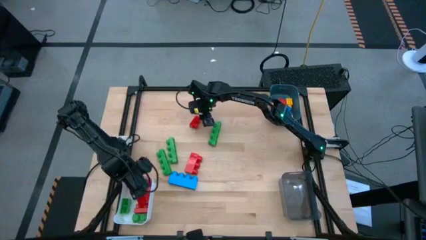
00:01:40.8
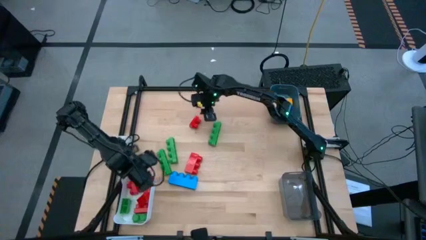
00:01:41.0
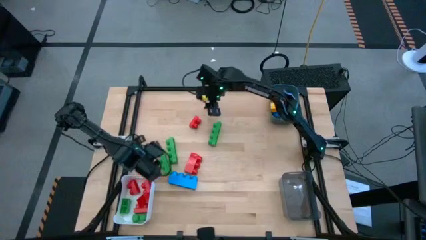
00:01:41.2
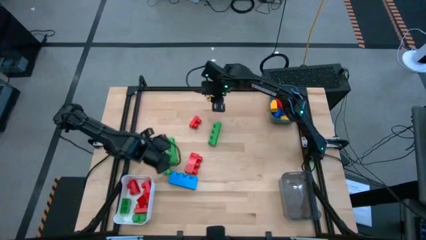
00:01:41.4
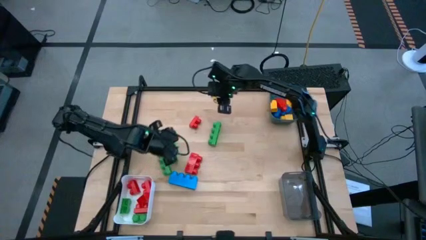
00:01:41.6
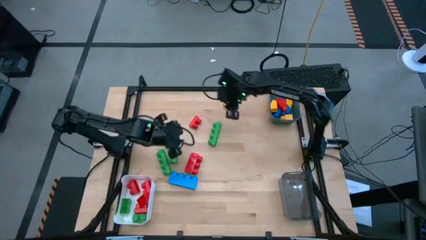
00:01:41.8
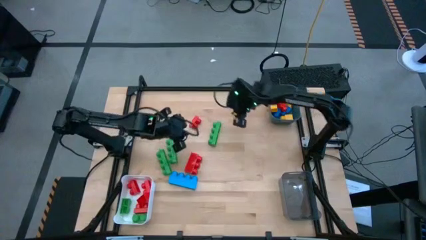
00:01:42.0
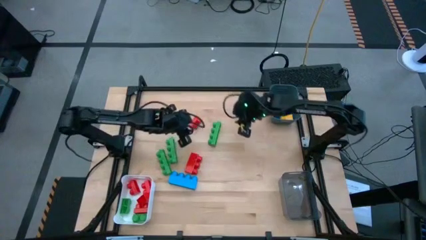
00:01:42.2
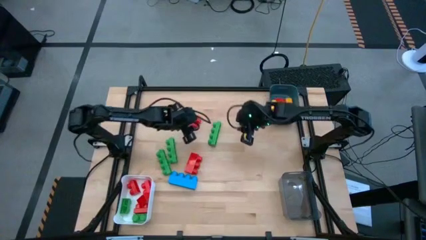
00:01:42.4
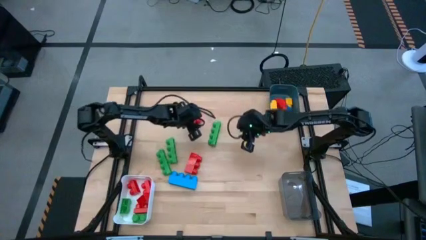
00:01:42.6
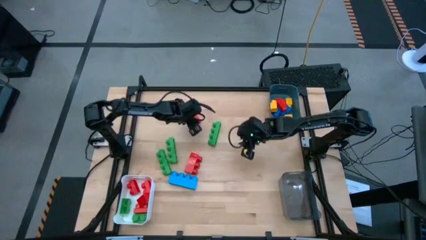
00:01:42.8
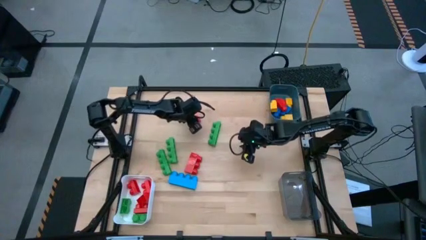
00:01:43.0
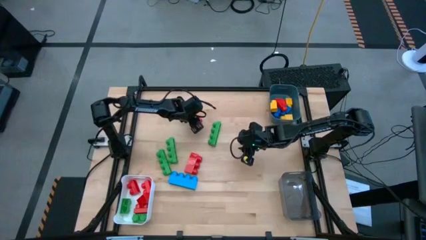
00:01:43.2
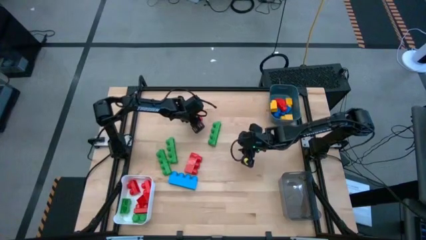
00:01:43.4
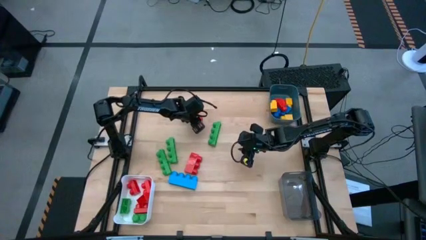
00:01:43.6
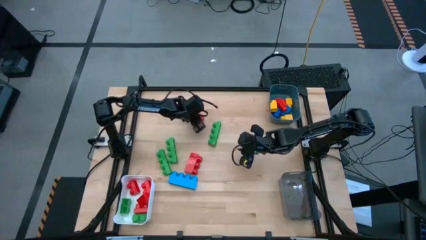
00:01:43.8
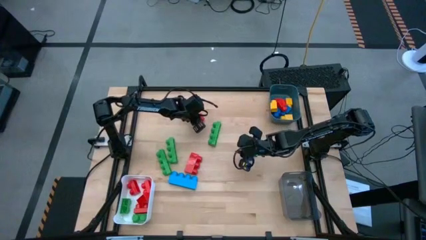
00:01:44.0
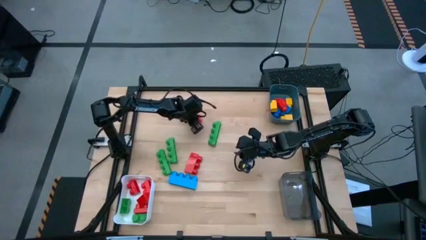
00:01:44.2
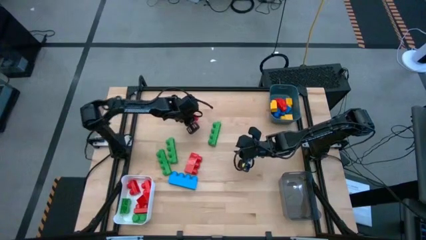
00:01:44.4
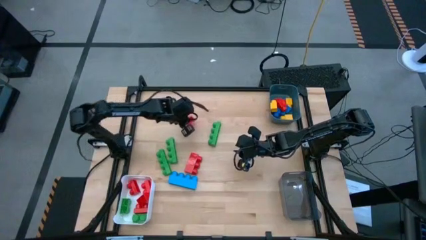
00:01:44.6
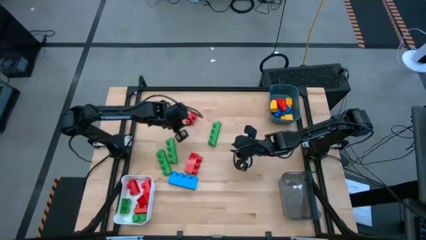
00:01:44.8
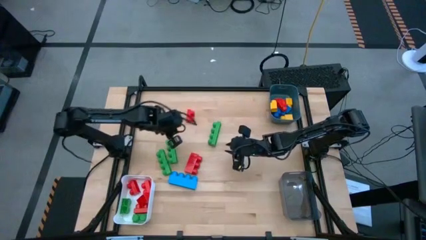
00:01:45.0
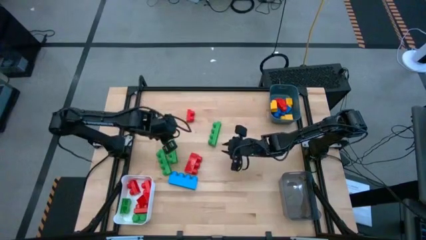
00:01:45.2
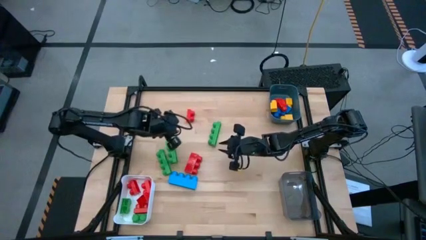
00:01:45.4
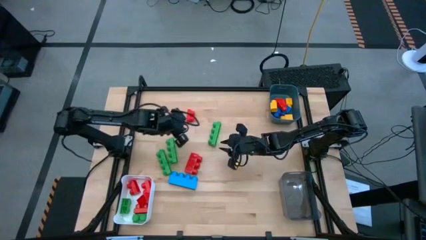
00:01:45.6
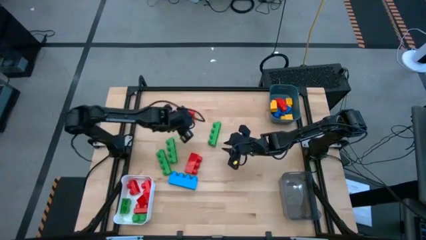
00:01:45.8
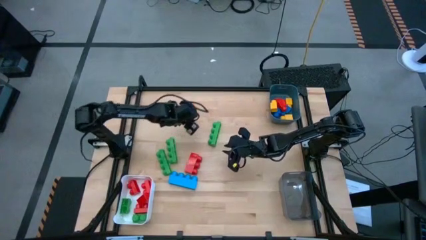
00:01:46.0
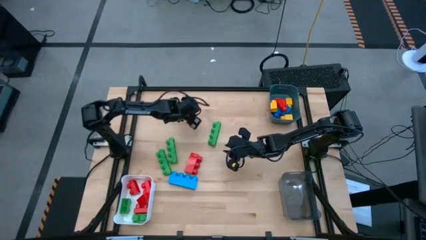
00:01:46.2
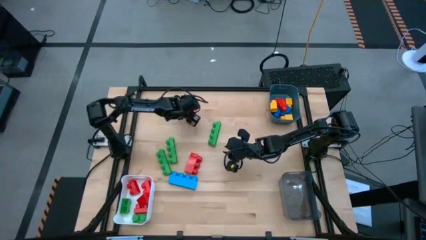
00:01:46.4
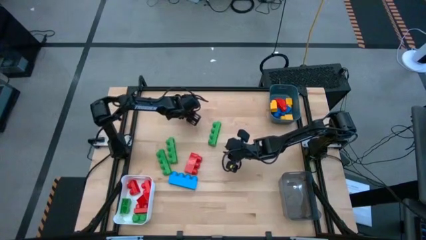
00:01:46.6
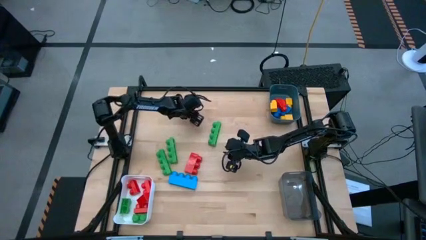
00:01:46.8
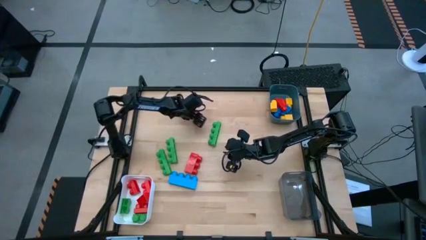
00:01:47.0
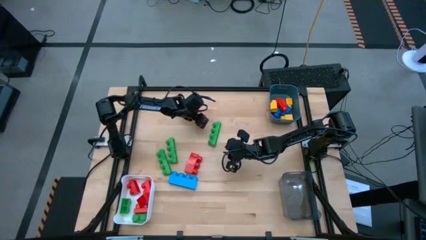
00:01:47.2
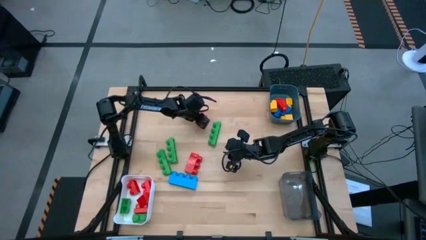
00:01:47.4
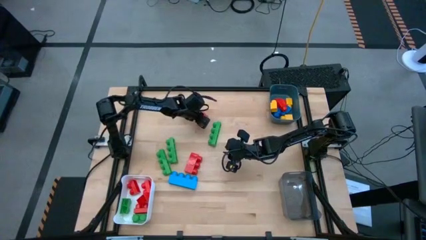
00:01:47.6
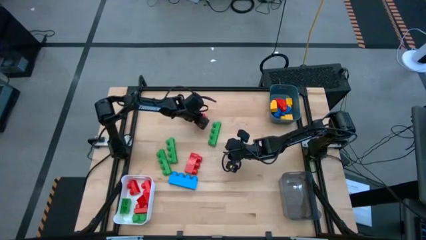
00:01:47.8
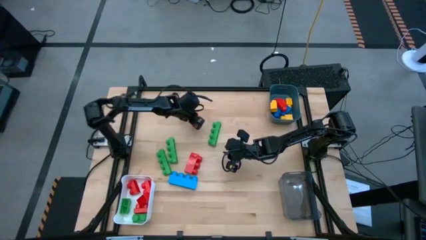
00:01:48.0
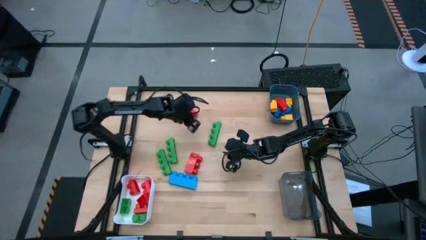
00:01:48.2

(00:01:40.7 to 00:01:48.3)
Task: Sort blocks by size
Put the two stud red game piece into the white bin

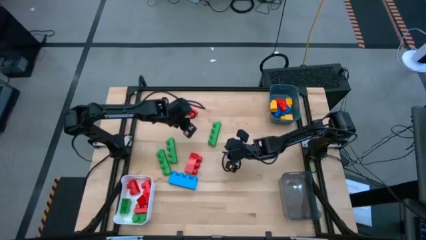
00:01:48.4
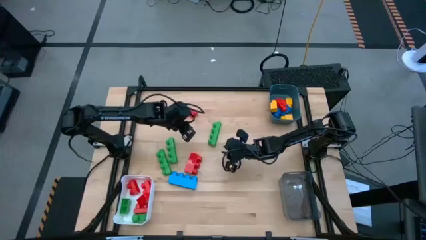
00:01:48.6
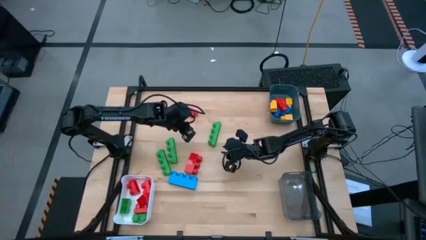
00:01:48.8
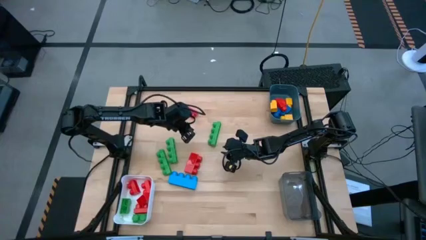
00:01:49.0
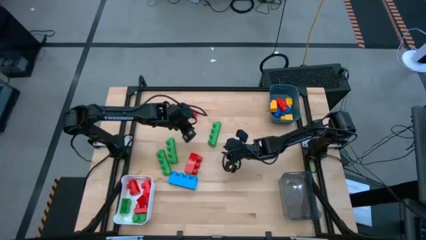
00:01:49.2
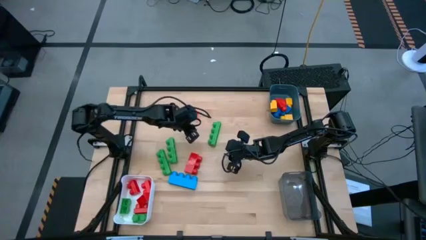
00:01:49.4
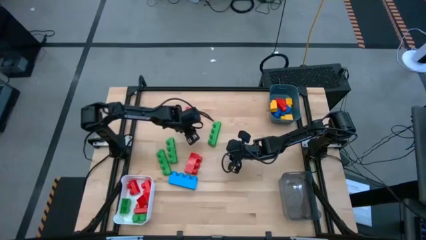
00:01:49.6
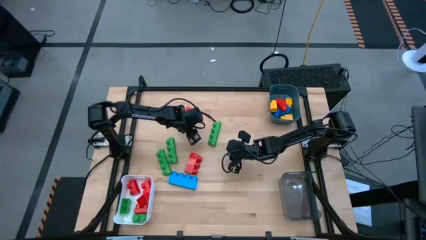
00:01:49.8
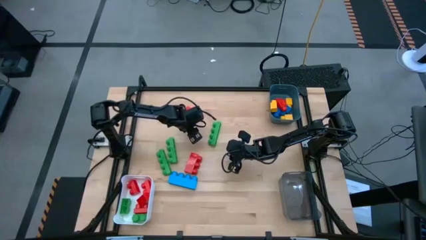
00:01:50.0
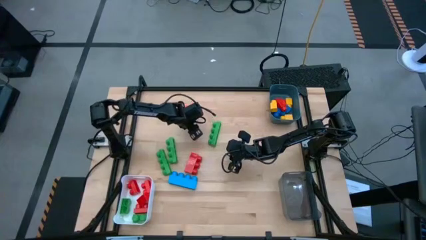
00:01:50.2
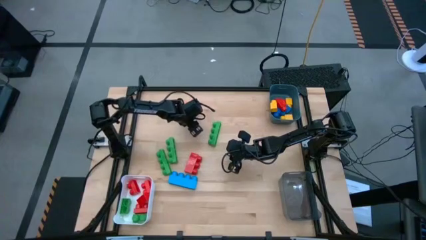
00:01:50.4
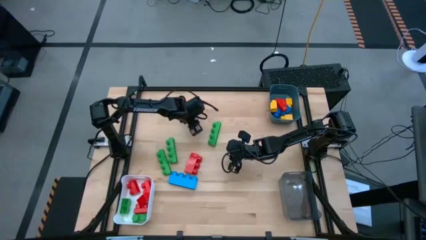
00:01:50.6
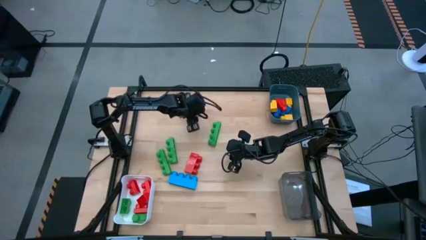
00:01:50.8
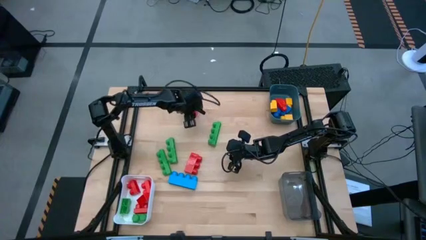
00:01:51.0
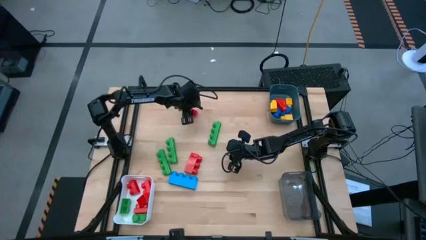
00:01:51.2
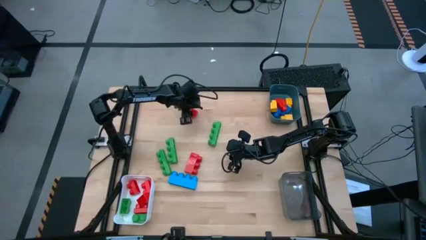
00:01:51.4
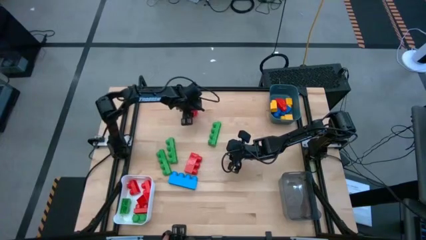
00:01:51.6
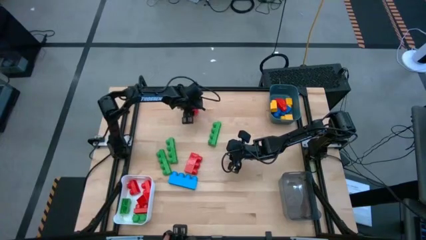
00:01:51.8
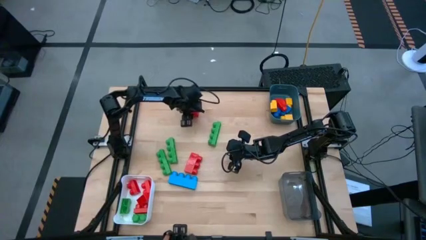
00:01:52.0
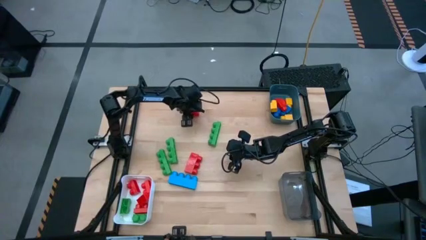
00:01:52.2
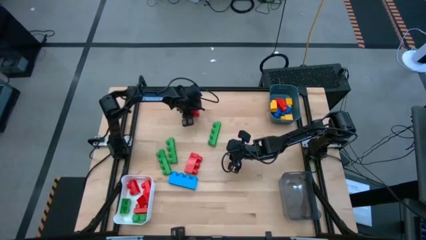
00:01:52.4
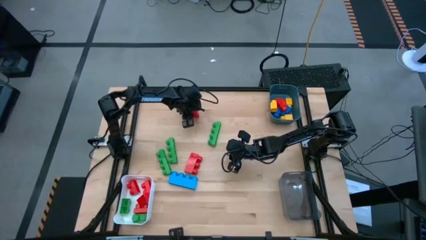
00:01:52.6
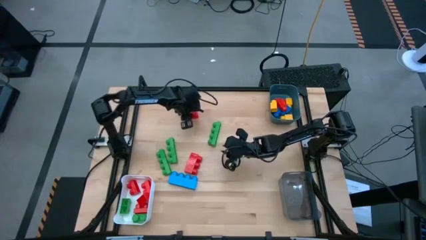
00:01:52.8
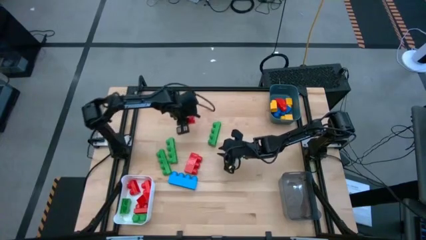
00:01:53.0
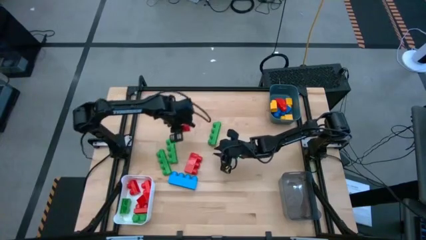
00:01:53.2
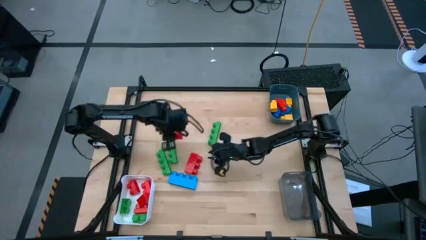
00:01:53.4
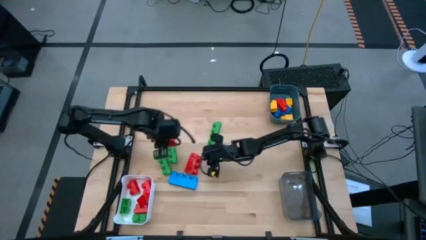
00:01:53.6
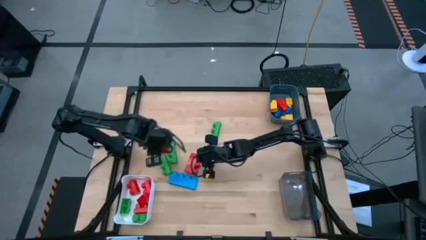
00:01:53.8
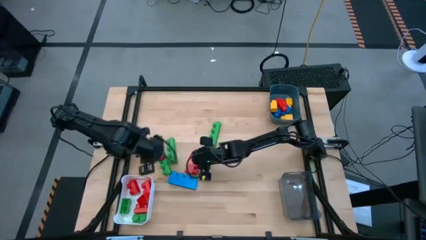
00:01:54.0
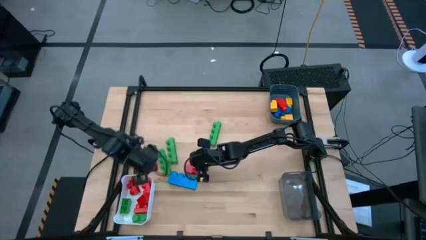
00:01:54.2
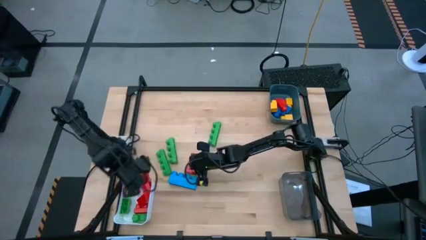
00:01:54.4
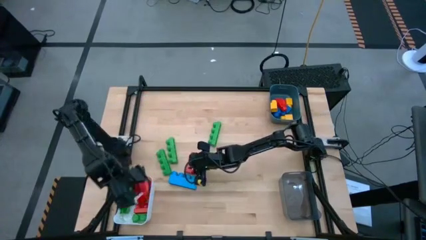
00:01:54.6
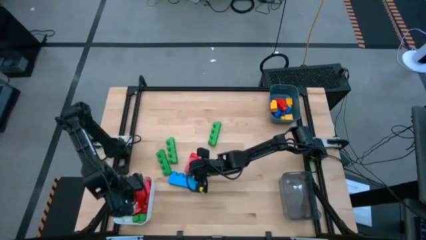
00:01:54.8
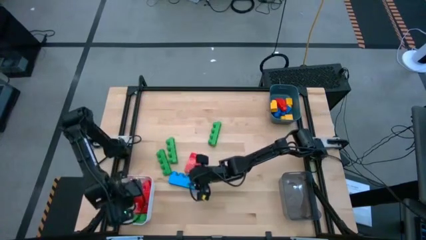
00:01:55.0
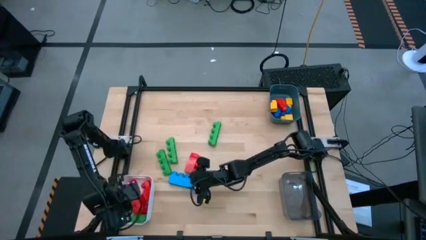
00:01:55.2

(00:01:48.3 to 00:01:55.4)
Put the two stud red game piece into the white bin
